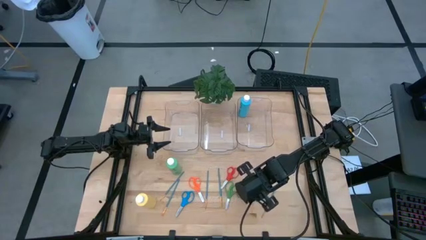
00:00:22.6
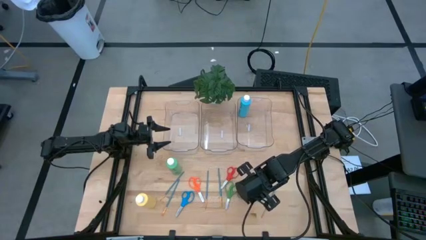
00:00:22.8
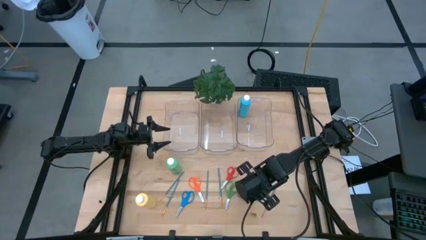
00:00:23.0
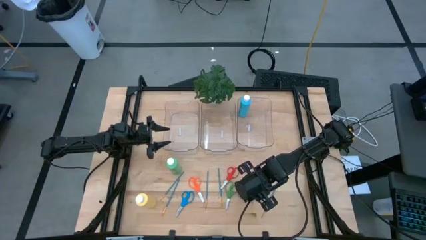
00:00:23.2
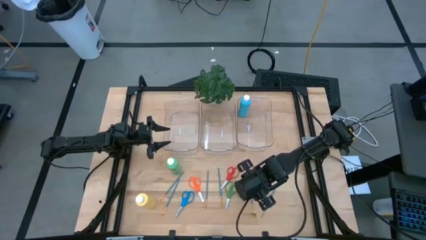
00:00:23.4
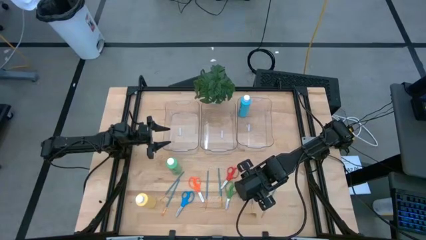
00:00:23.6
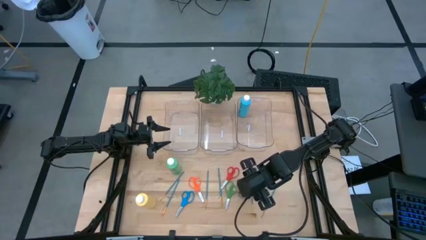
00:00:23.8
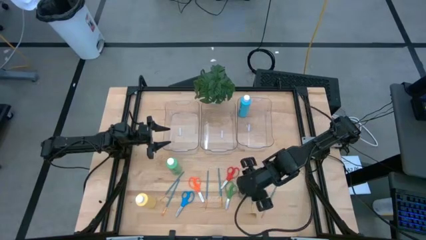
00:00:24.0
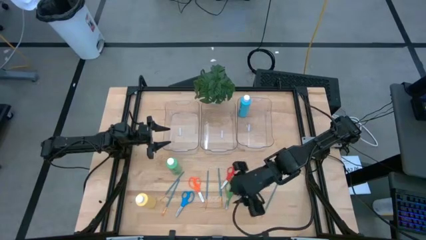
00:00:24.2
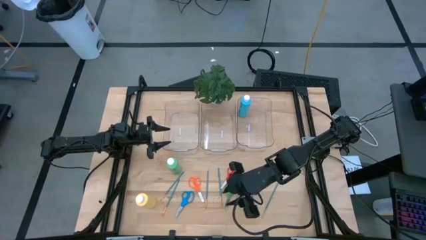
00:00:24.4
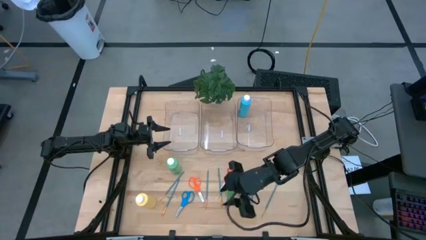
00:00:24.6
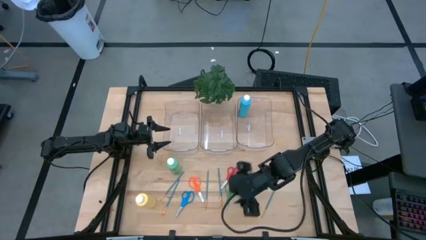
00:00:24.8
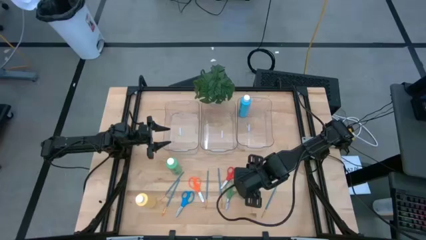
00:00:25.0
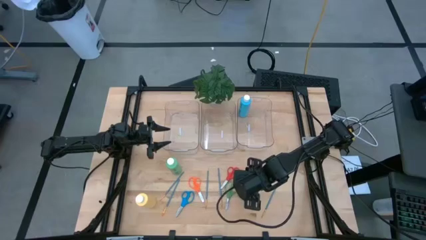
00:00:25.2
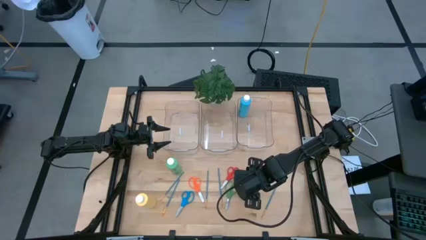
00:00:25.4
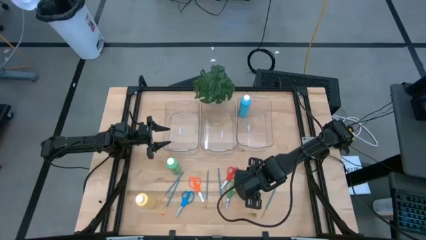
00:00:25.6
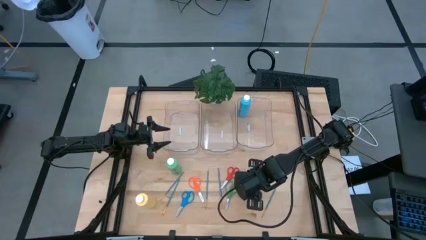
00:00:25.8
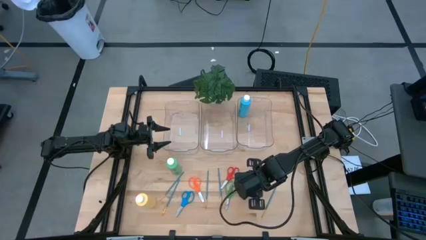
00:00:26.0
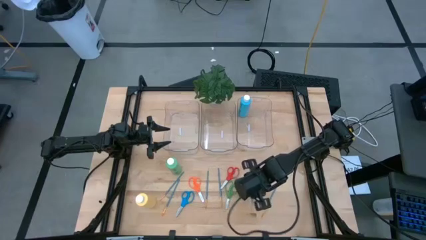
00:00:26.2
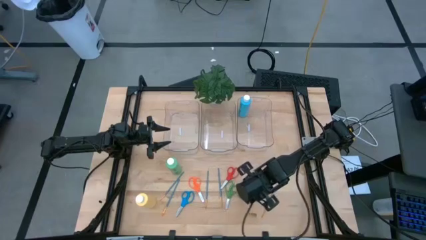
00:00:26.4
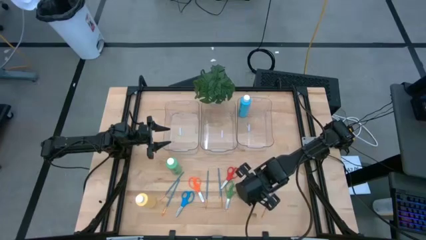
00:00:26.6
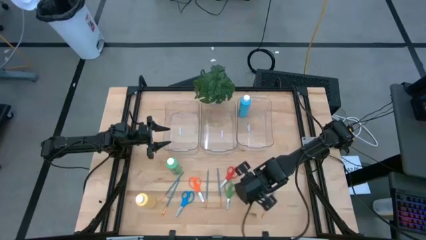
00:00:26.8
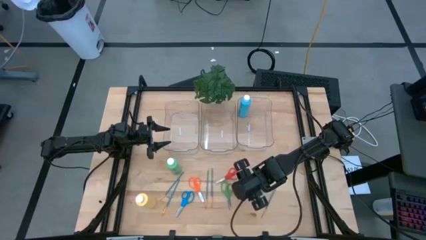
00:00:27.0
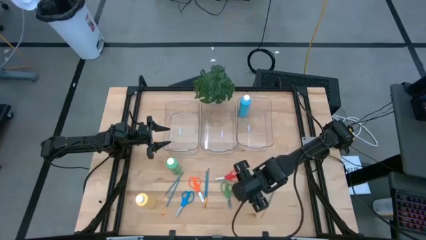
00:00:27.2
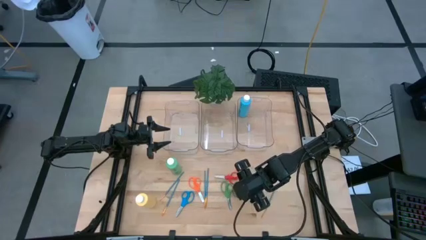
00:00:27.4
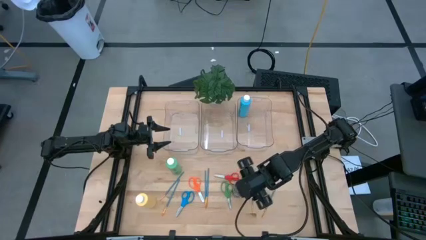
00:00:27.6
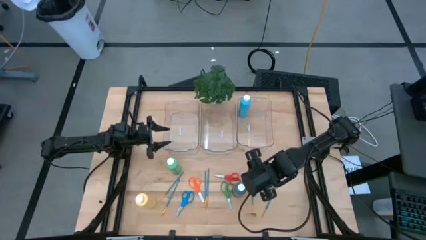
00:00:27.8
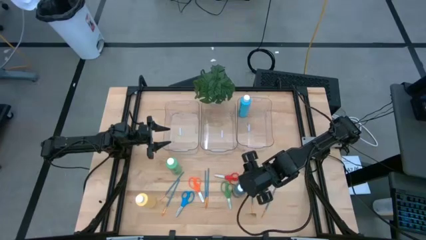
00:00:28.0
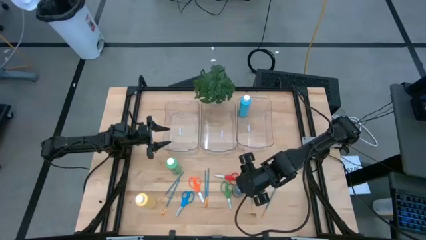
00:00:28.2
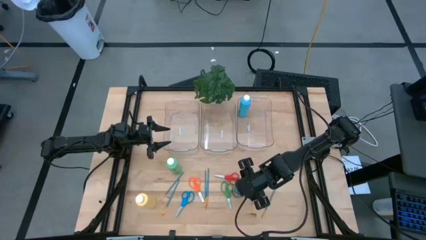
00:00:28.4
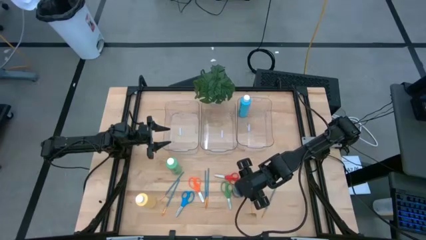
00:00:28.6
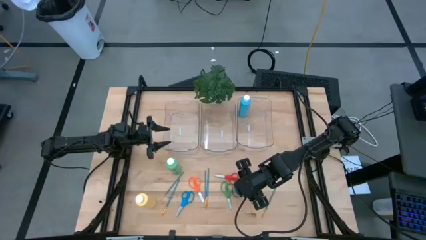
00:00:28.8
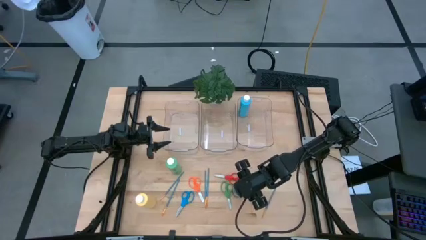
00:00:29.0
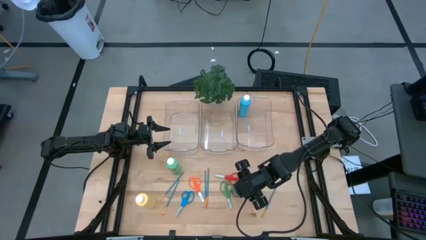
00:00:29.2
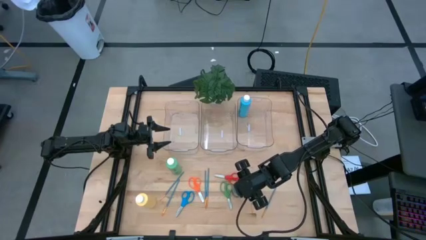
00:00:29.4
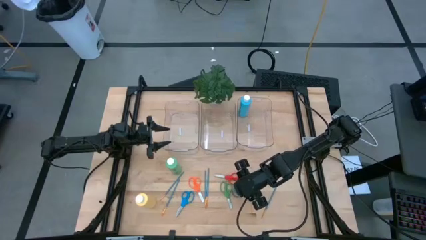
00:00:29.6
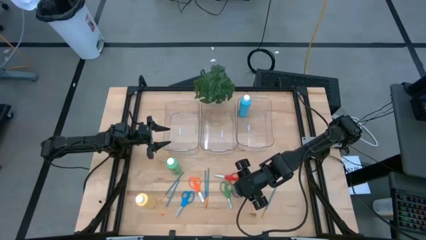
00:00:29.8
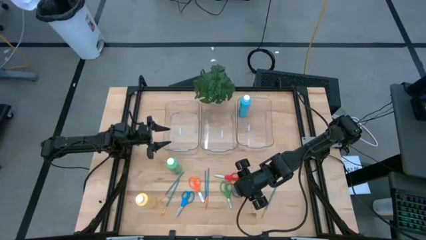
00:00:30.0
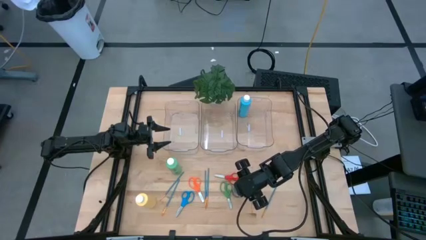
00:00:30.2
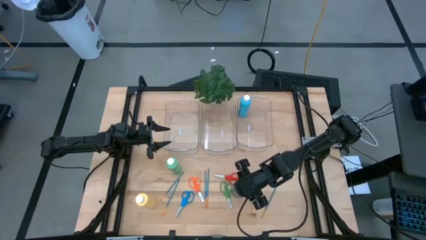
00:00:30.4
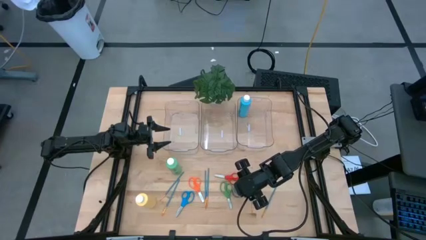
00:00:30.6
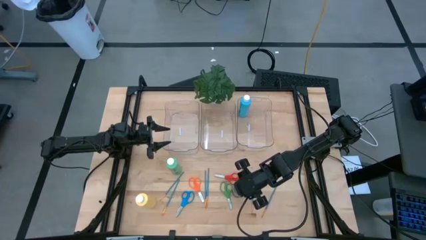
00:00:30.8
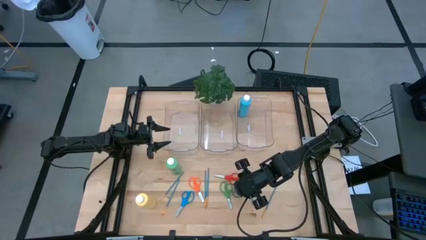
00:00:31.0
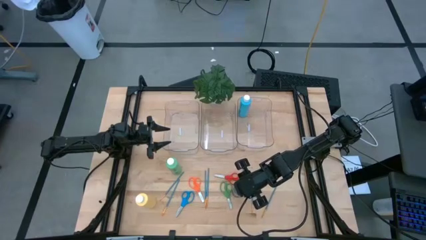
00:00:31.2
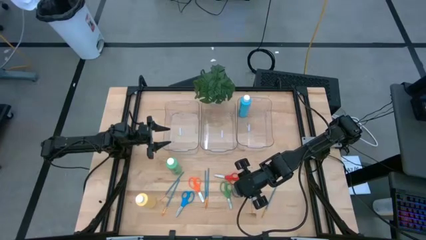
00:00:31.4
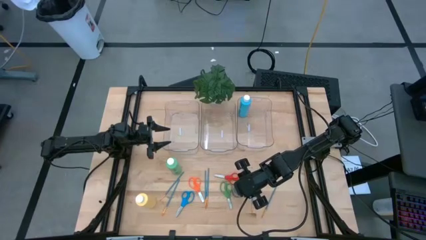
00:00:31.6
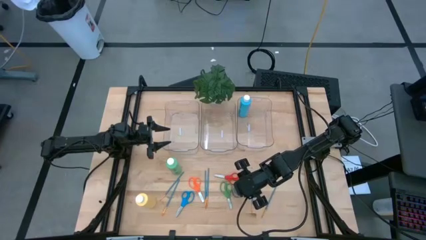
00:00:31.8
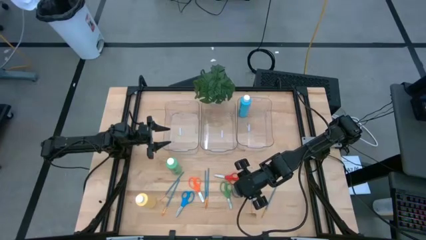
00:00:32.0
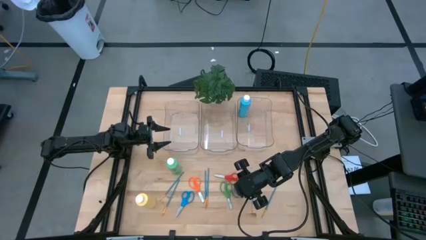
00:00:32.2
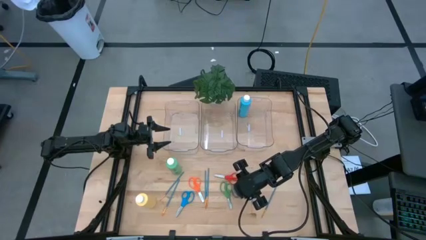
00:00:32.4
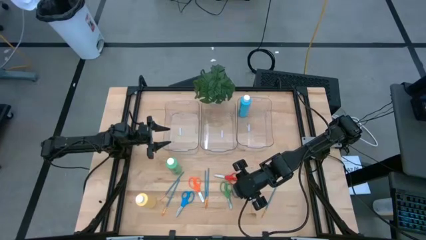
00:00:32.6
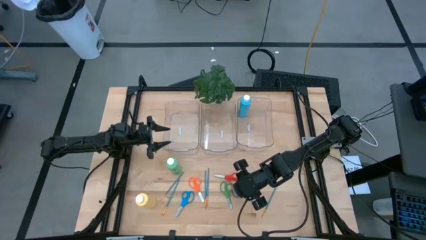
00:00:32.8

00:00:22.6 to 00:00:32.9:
Task: Pick & Place Paint Supplies
Put the blue paint bottle into the right transparent bin

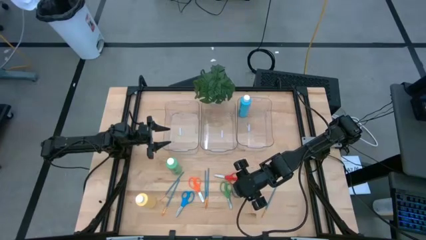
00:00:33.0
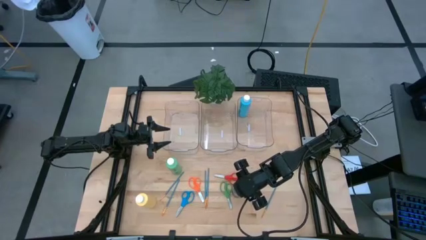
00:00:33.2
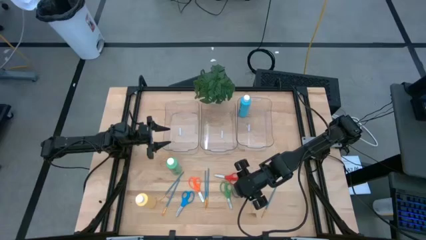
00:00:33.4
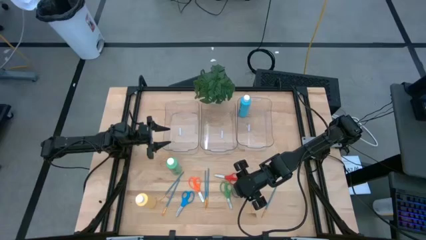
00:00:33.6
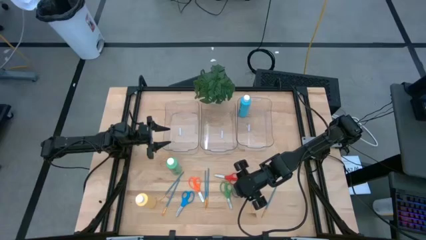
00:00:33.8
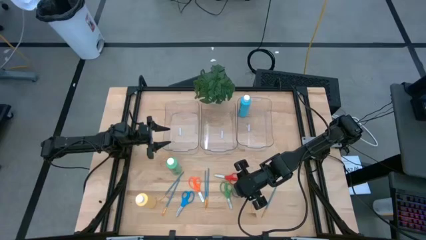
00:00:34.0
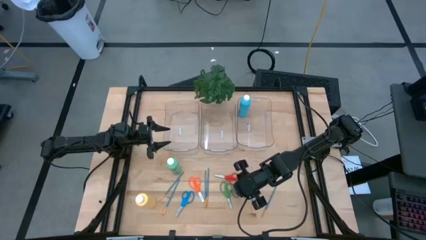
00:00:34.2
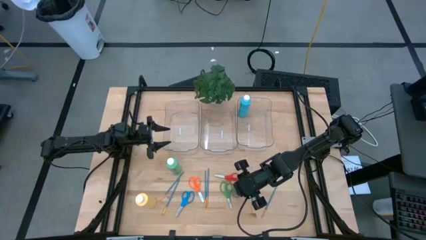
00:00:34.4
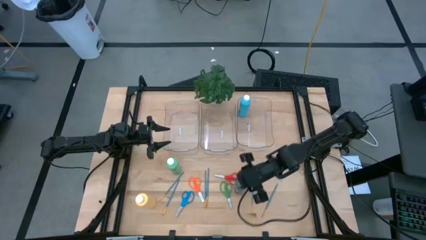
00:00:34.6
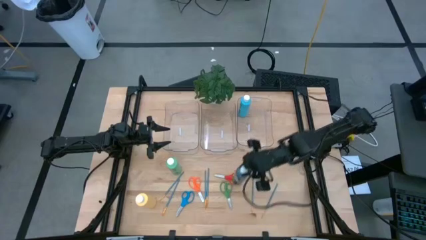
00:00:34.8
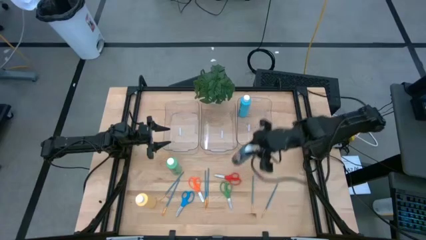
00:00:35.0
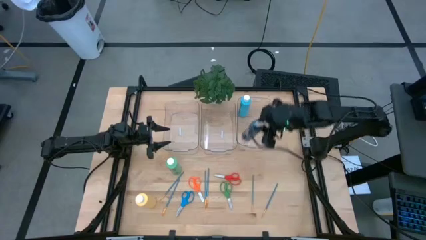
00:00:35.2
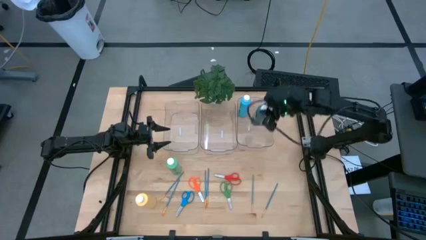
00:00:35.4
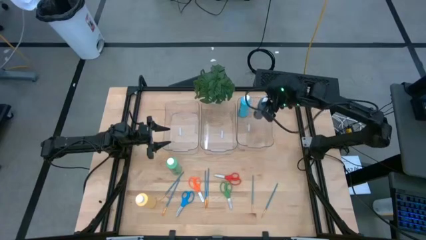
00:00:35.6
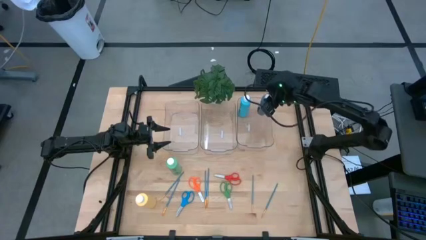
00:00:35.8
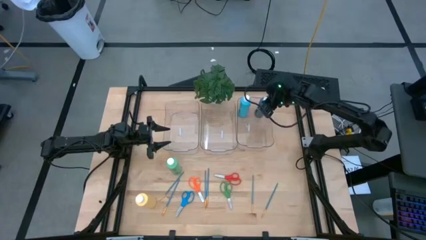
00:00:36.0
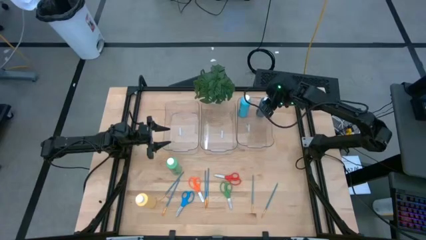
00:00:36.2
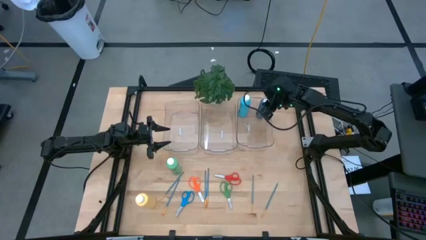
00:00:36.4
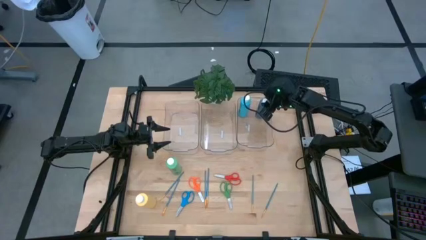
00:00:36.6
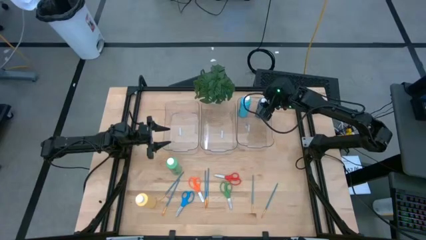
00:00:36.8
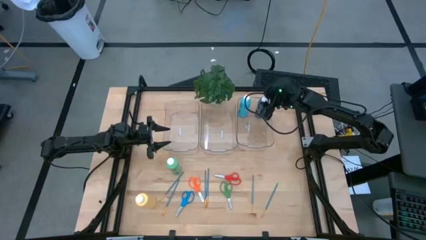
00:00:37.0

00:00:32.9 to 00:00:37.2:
Put the blue paint bottle into the right transparent bin
